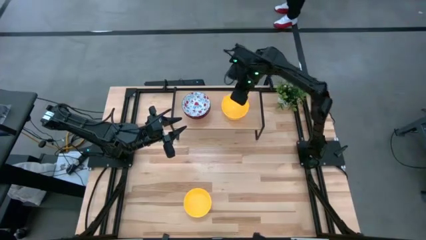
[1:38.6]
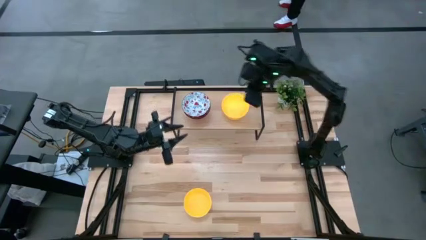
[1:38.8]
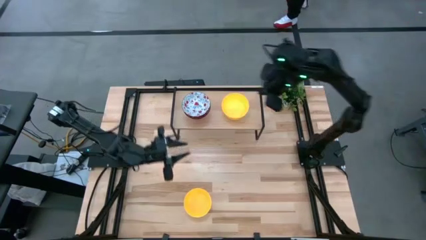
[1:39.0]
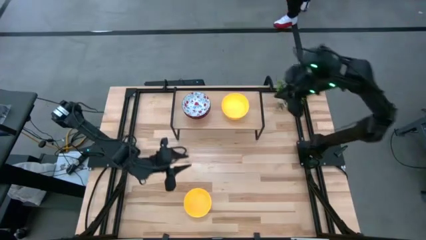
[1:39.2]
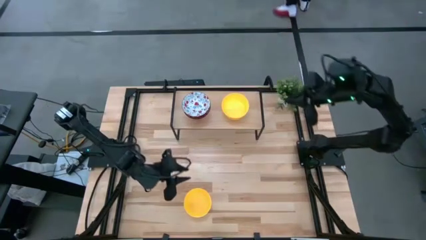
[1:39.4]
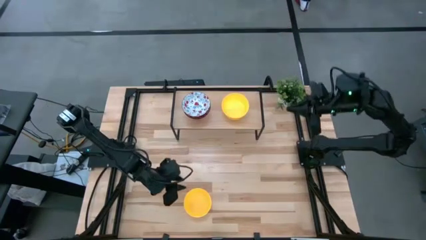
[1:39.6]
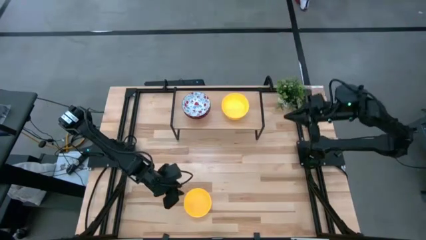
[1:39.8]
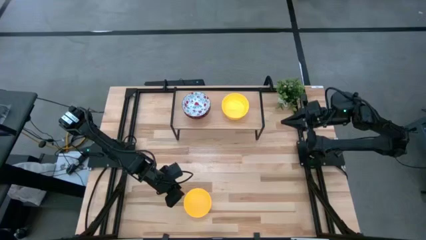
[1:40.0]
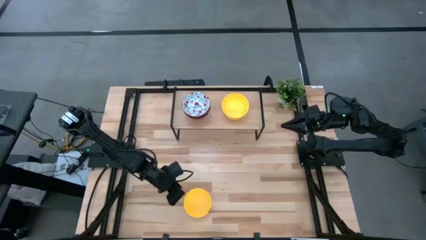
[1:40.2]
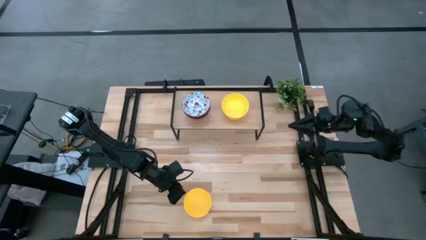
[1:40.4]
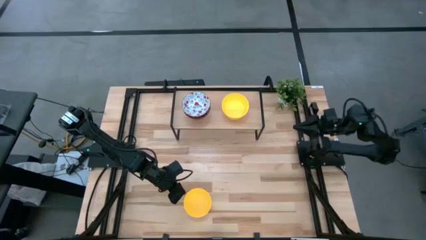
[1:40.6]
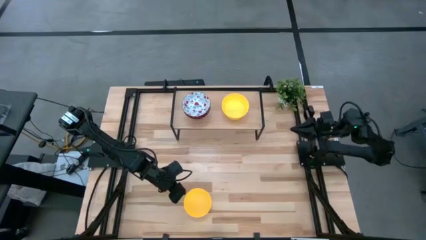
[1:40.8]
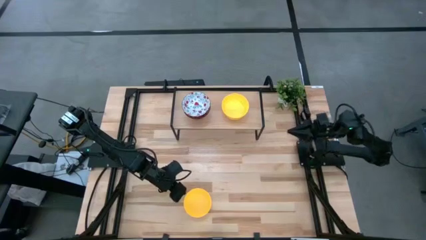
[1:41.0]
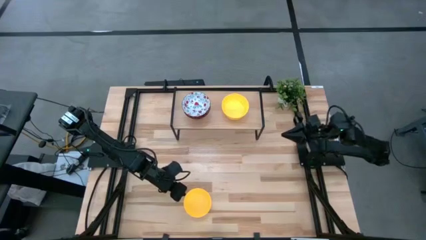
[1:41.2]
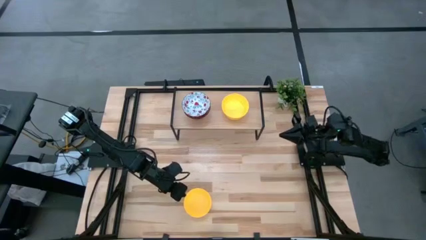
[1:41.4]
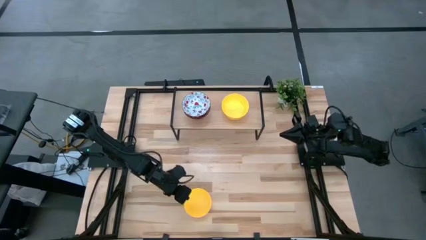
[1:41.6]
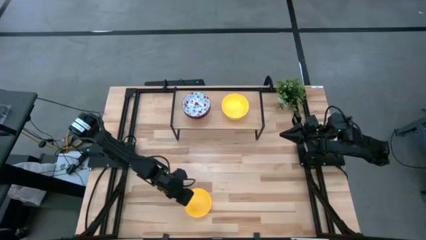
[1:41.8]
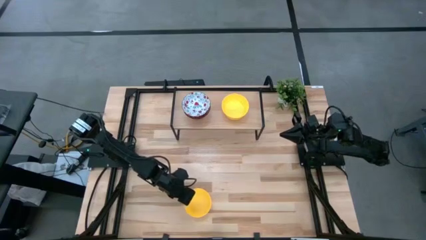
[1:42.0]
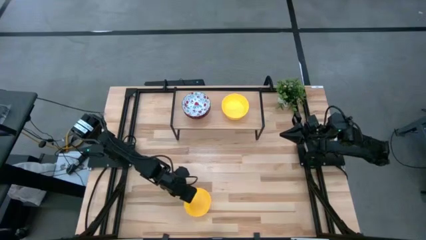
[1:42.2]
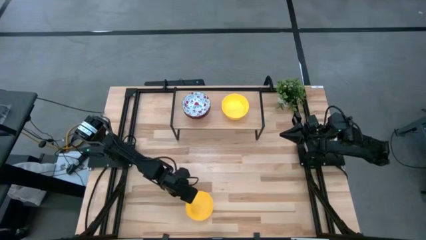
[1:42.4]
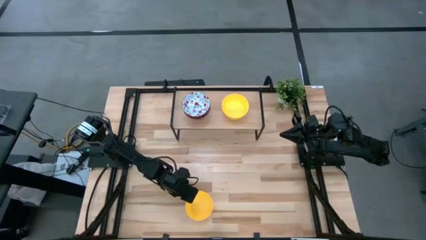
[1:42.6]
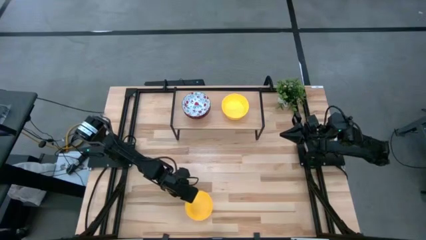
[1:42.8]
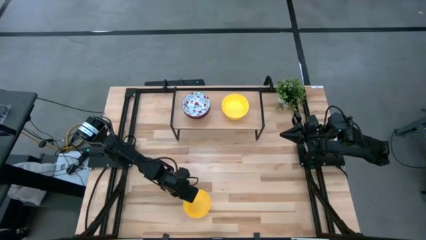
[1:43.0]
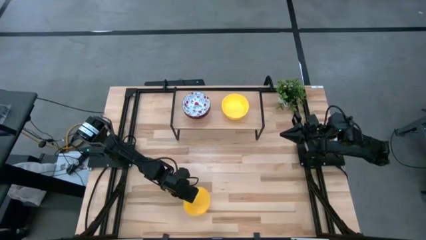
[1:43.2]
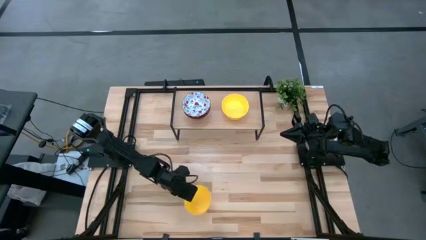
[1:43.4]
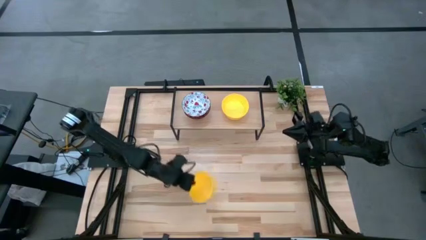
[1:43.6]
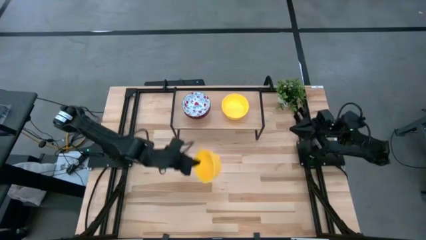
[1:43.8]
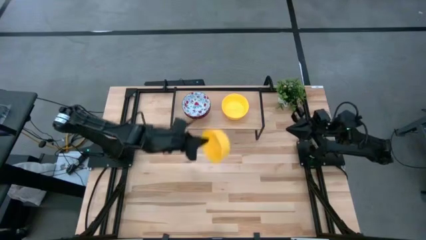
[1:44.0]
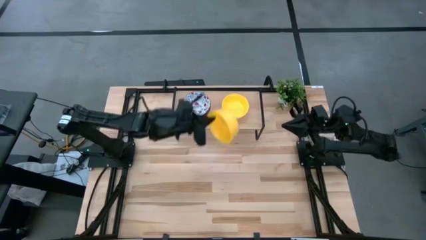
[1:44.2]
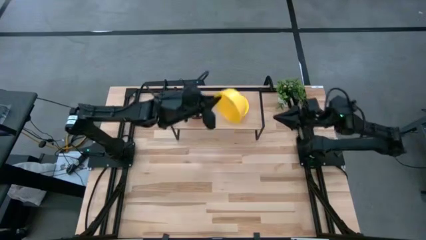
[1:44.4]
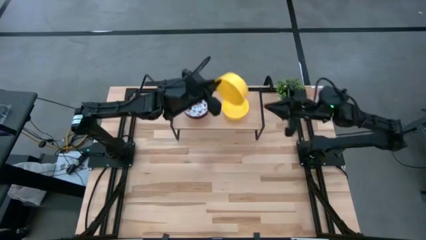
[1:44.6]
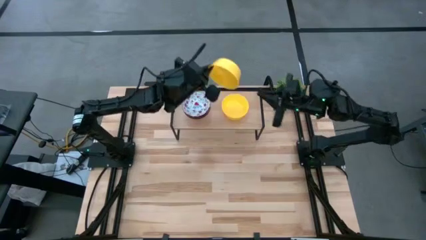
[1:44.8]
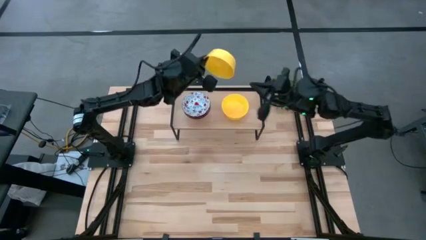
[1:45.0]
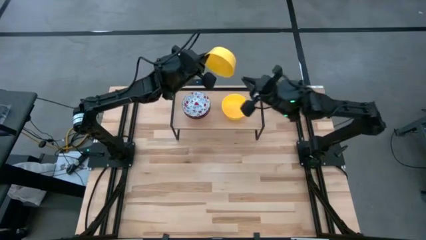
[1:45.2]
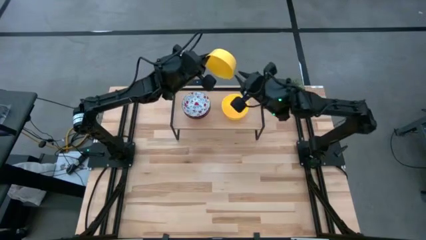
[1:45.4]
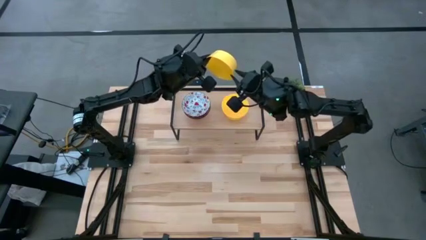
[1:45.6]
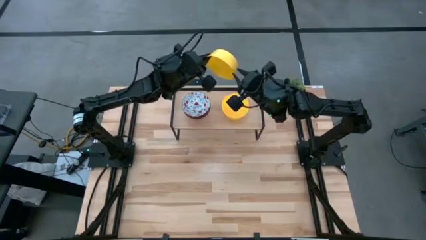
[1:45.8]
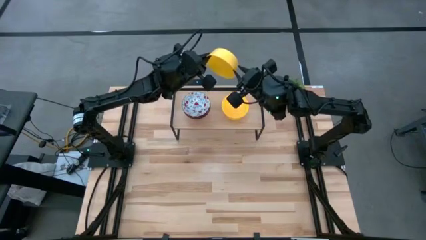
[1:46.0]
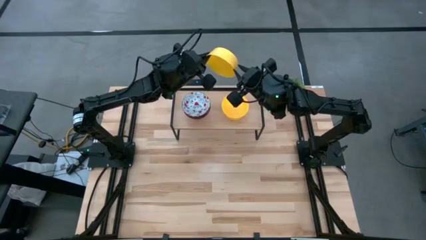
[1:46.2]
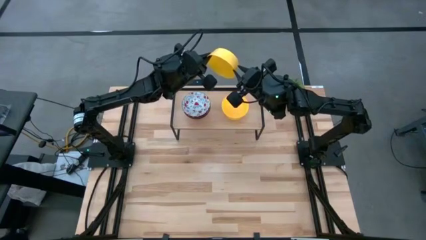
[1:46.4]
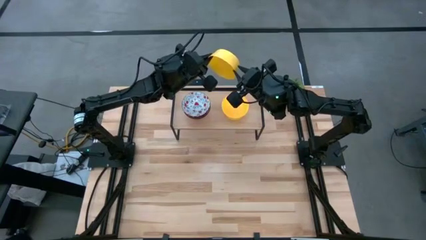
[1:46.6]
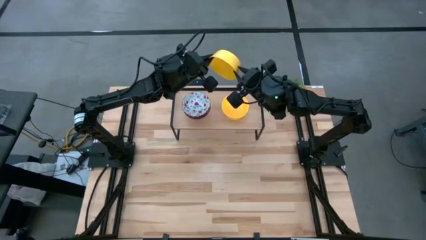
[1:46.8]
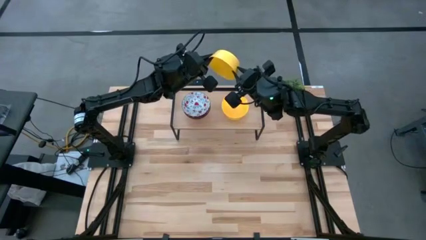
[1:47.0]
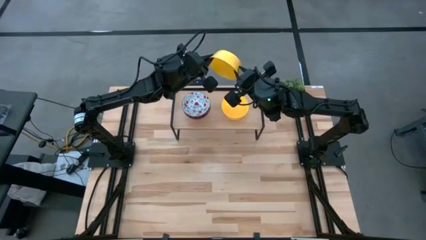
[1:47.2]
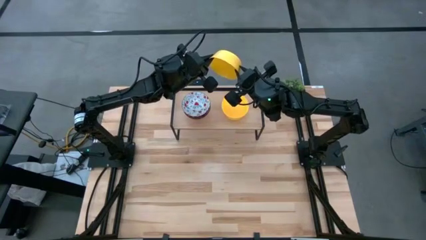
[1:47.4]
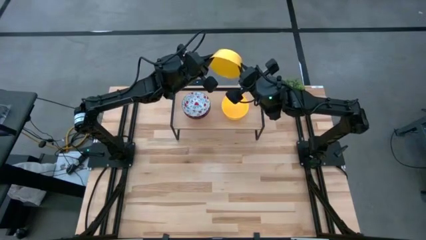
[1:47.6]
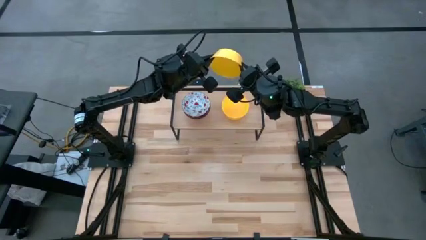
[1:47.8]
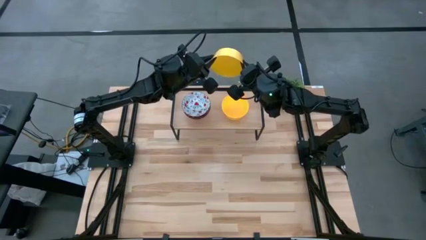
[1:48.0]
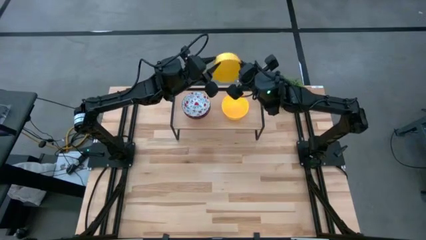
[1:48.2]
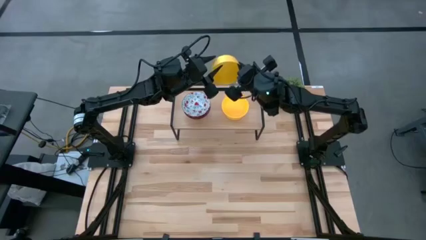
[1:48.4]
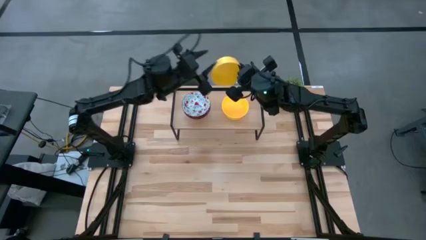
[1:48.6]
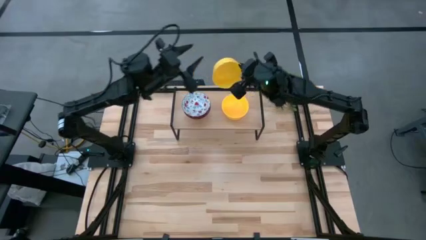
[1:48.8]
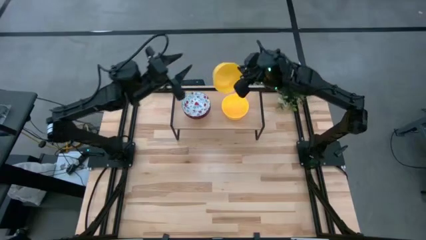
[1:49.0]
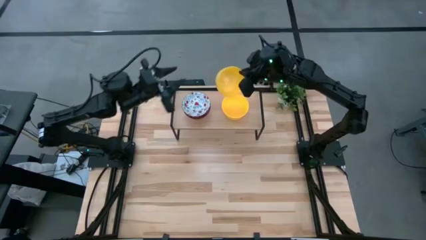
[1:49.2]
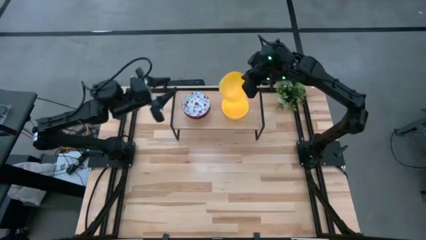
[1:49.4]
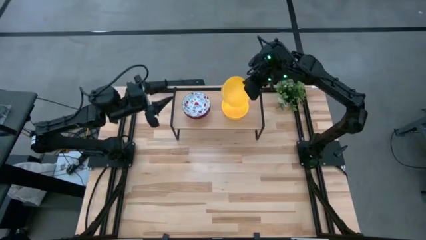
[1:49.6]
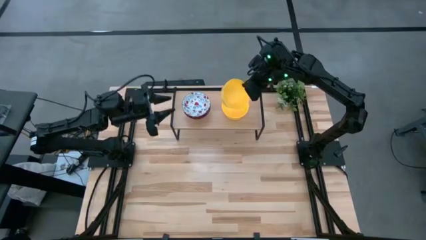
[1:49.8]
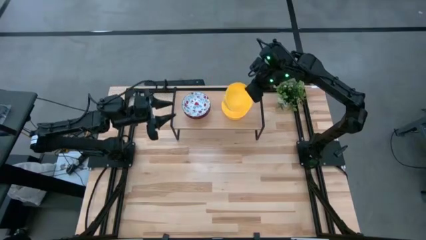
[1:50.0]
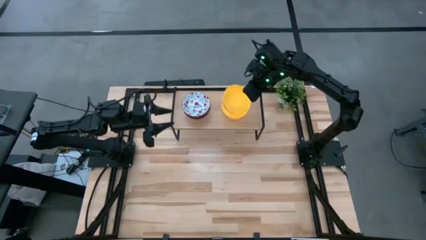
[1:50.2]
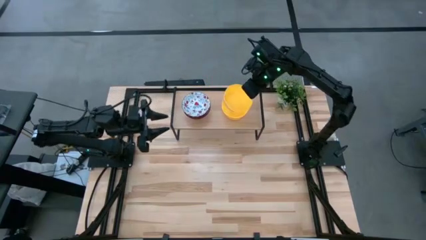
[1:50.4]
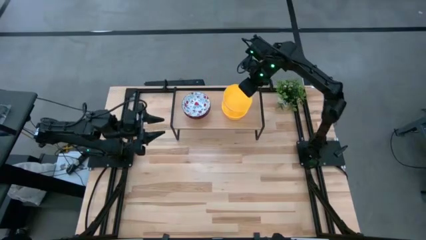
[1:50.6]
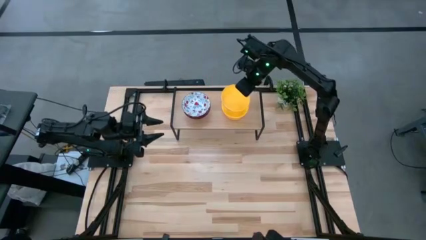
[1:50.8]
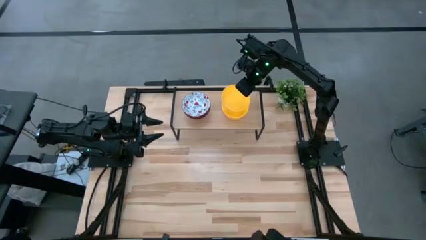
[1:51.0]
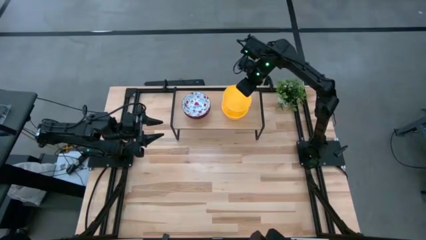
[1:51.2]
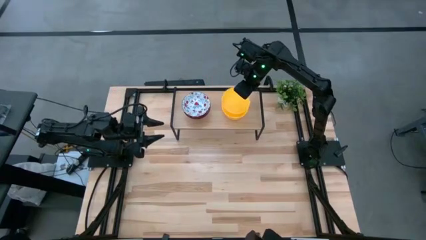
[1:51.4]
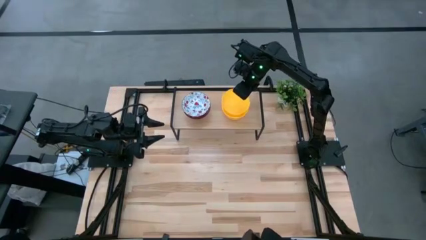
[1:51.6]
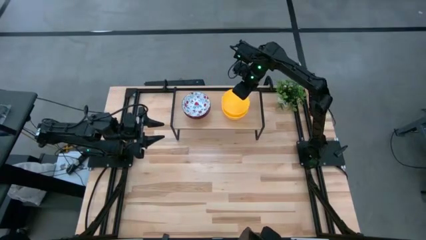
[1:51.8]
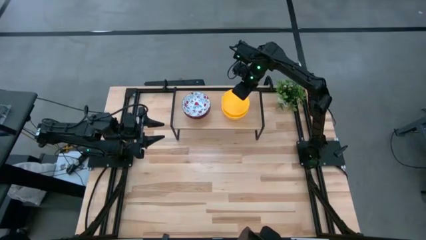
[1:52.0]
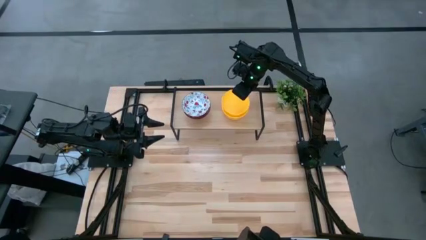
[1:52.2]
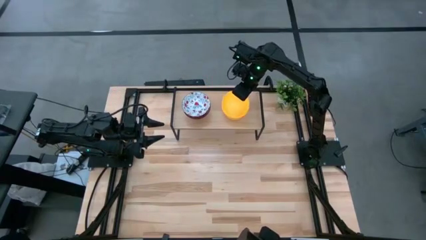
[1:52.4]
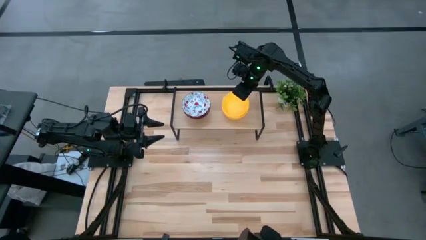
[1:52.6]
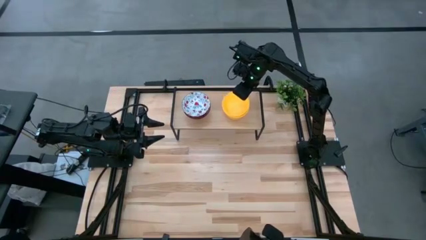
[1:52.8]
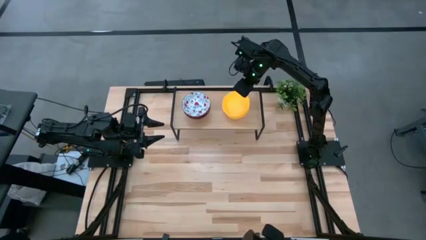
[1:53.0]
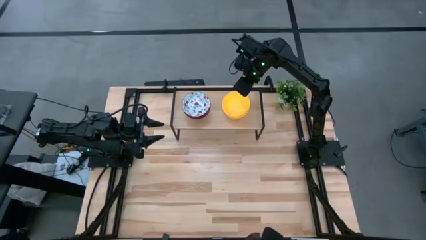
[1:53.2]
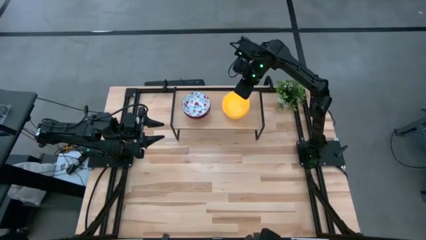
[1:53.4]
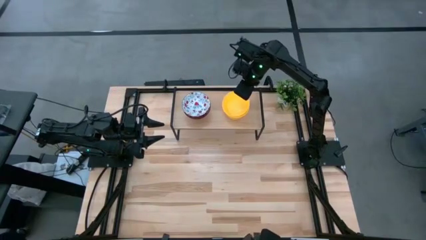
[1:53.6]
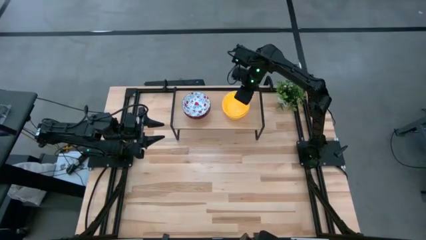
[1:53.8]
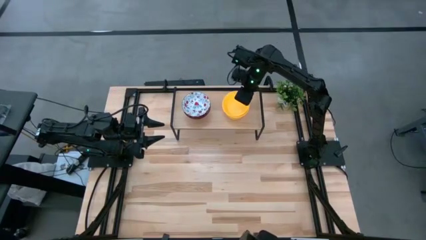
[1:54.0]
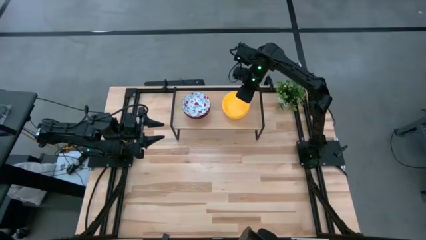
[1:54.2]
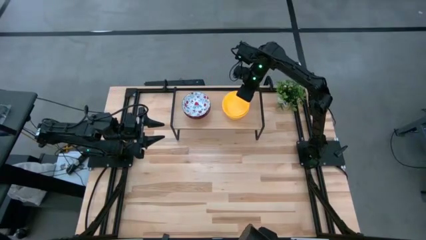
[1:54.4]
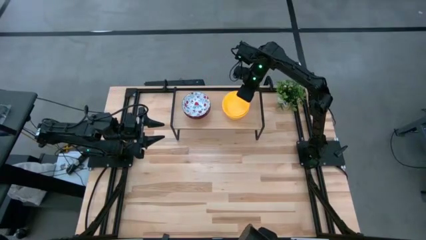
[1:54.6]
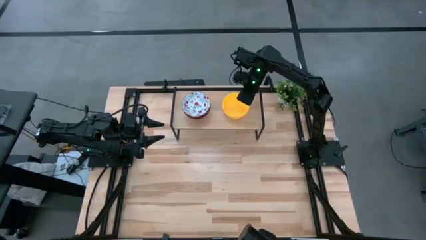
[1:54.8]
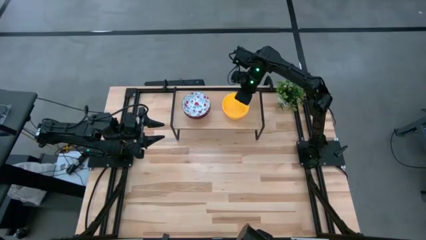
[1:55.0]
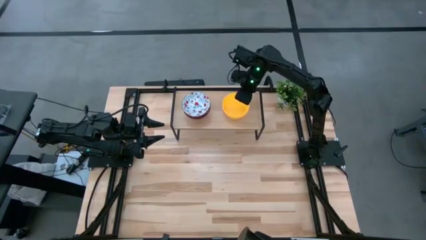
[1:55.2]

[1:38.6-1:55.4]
Task: Pick & Place Mini bowls
Stack the yellow bowl on the yellow bowl on the shelf
